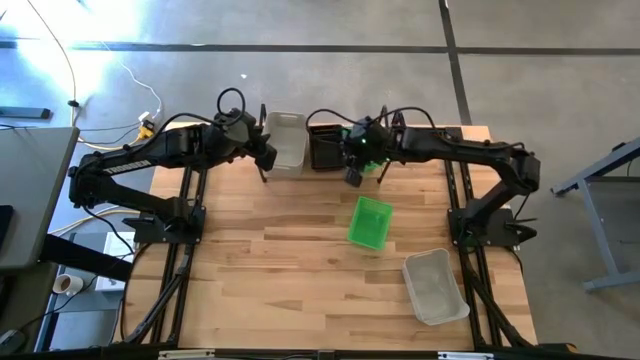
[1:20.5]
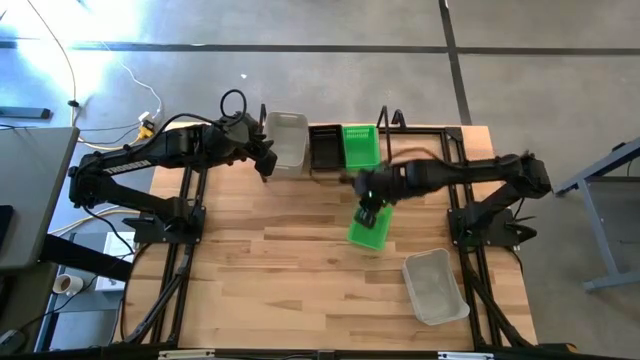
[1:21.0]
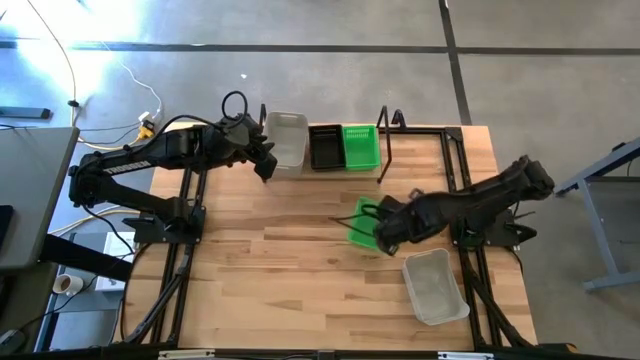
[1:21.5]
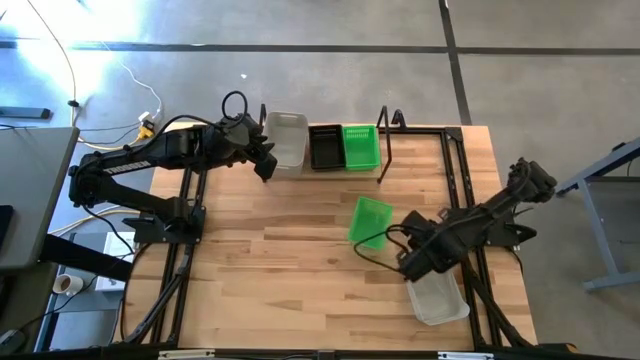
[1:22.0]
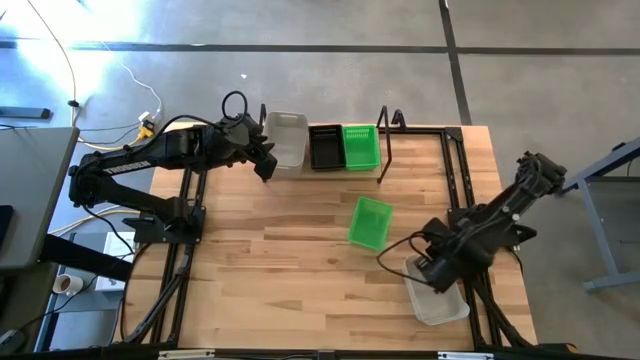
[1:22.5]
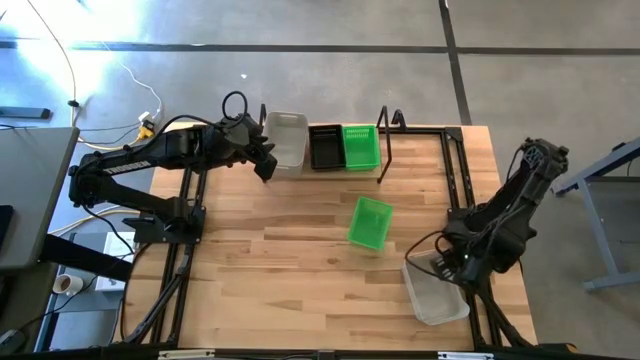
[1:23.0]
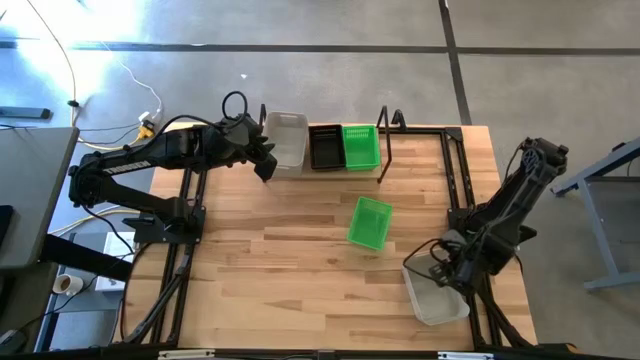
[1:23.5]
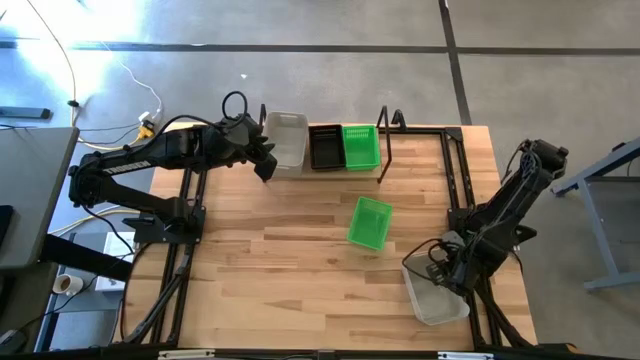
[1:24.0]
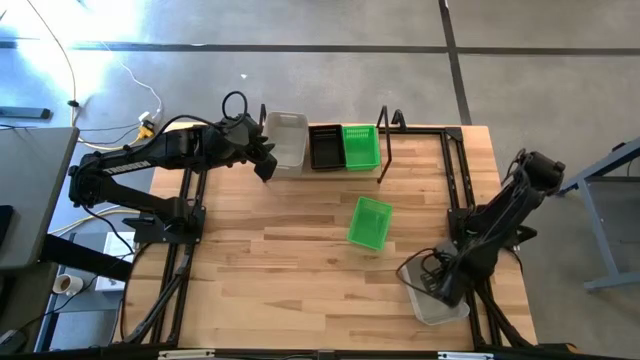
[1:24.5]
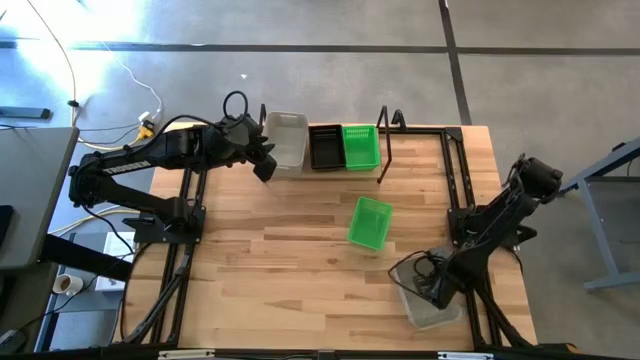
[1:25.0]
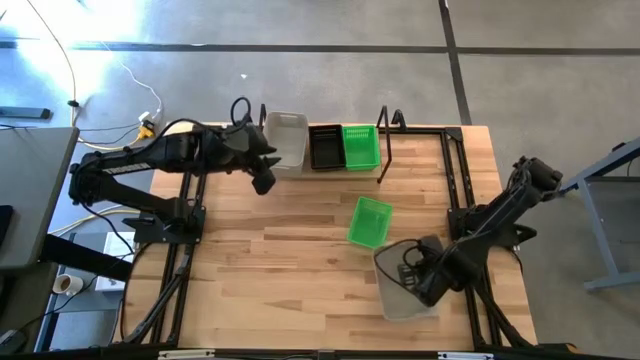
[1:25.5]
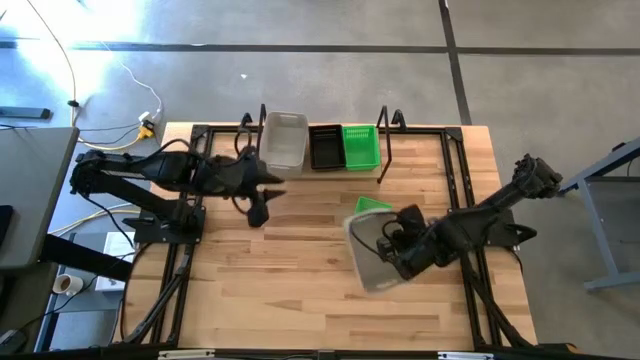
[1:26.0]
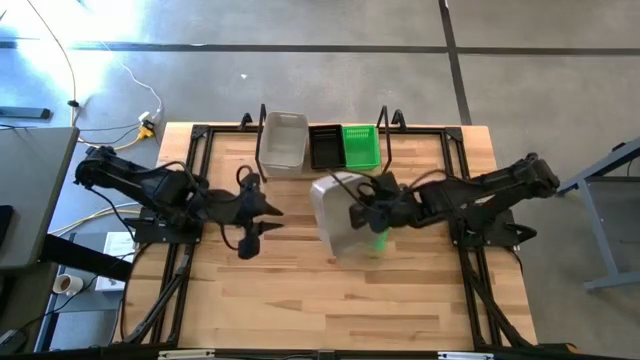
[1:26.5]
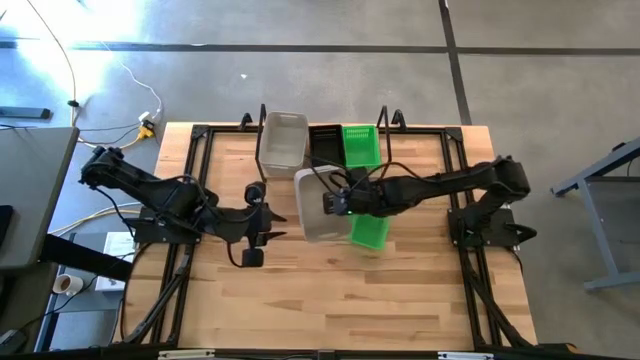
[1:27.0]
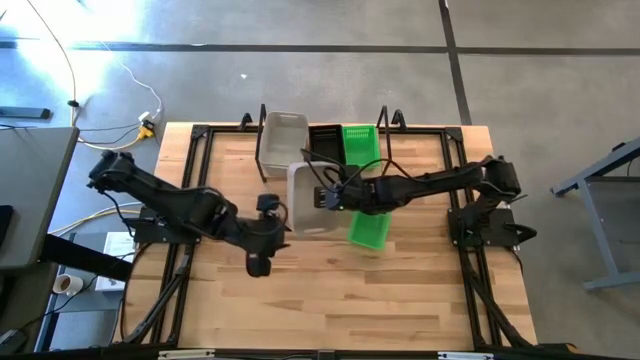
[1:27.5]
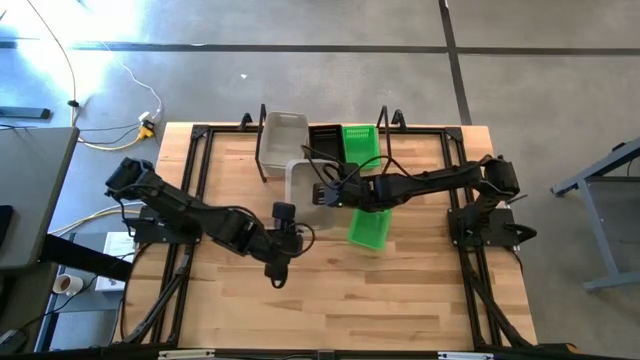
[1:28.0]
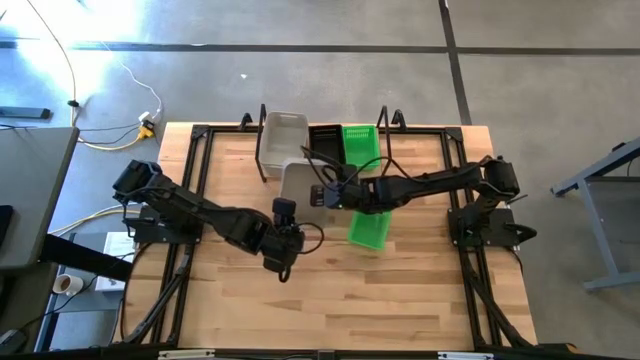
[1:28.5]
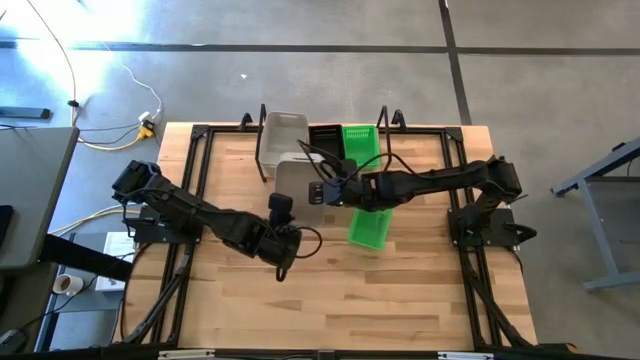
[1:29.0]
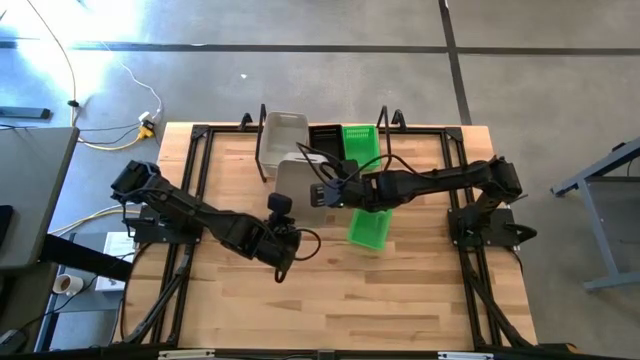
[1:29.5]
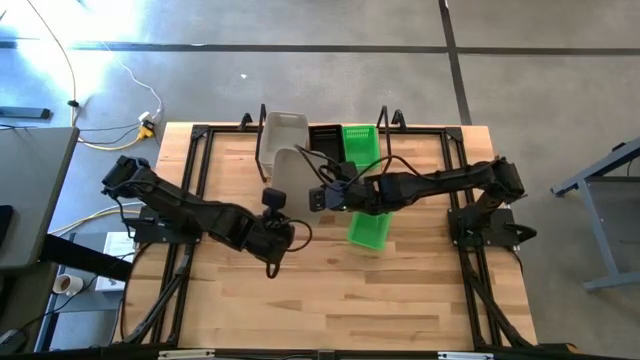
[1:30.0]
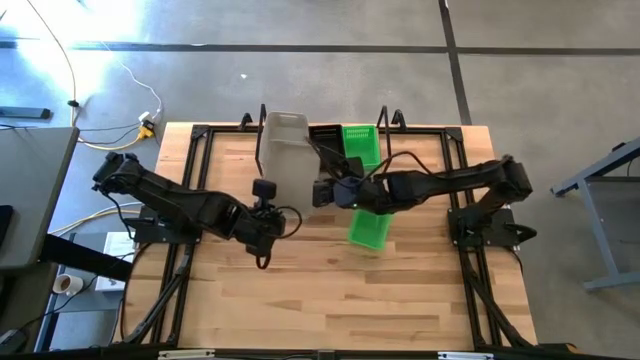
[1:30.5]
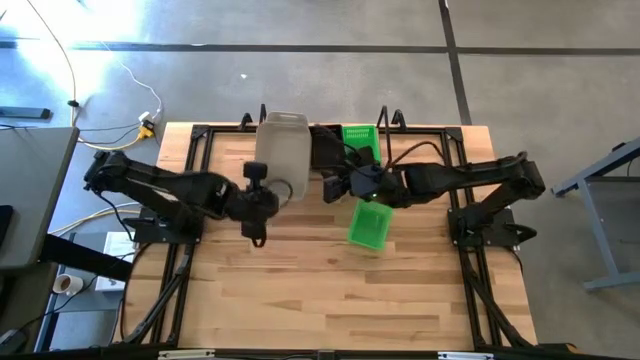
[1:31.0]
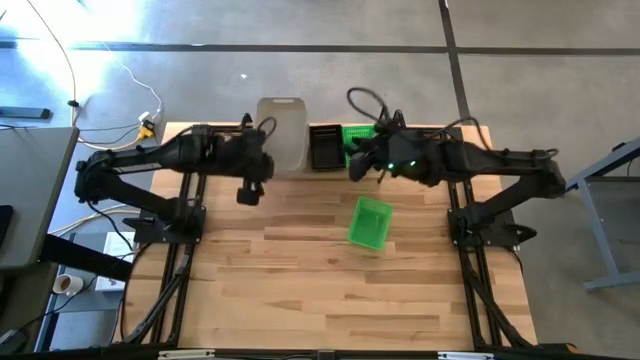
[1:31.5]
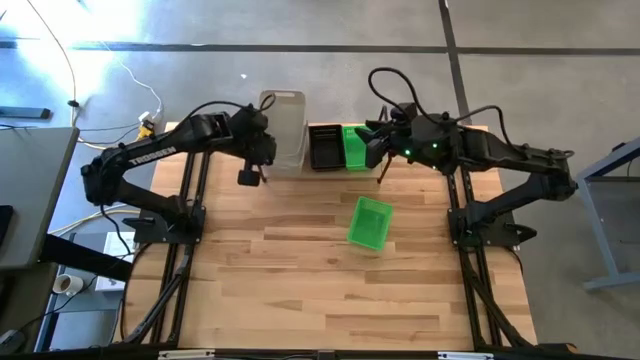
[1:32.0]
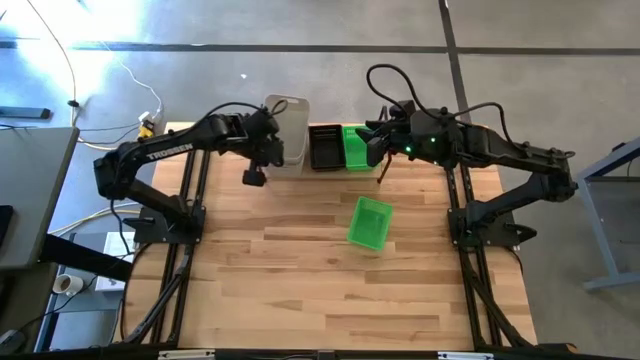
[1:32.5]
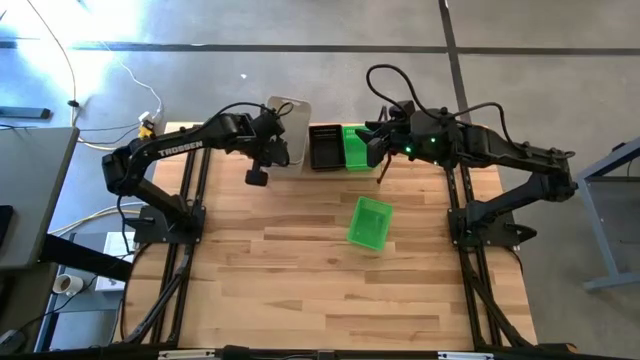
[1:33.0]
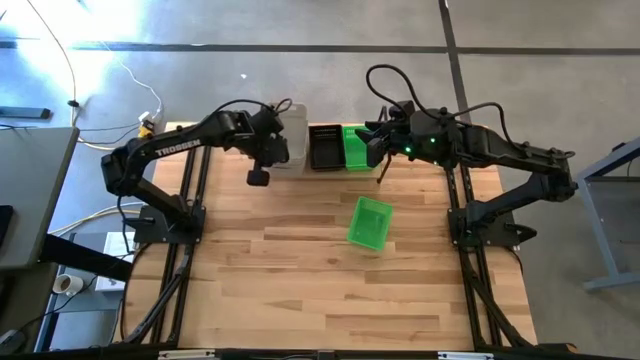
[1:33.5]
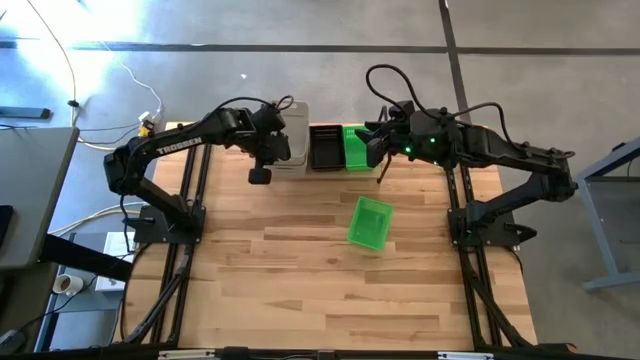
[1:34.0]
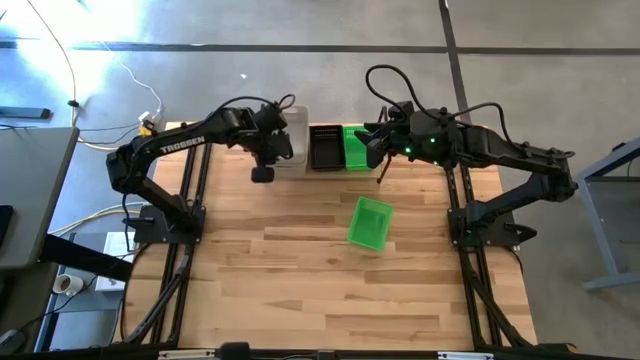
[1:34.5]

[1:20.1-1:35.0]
Task: Stack baskets on shelf by color
Stack the gray bin on the gray bins on the shelf

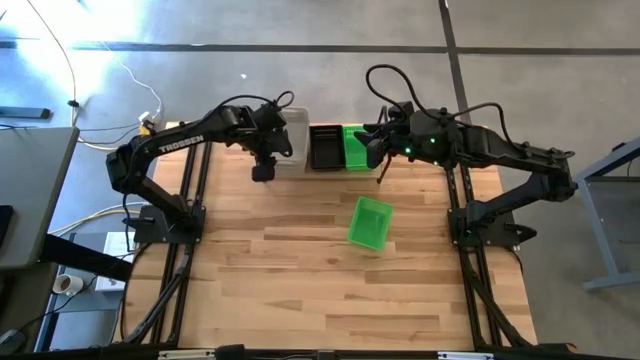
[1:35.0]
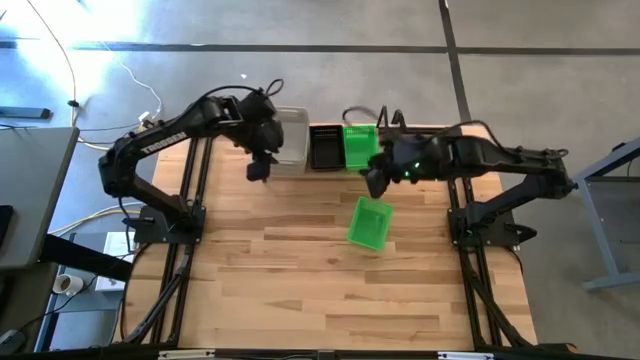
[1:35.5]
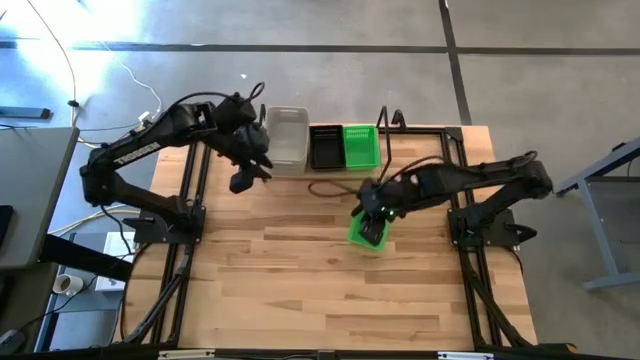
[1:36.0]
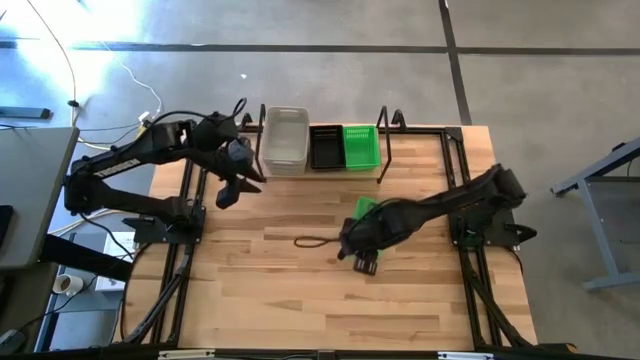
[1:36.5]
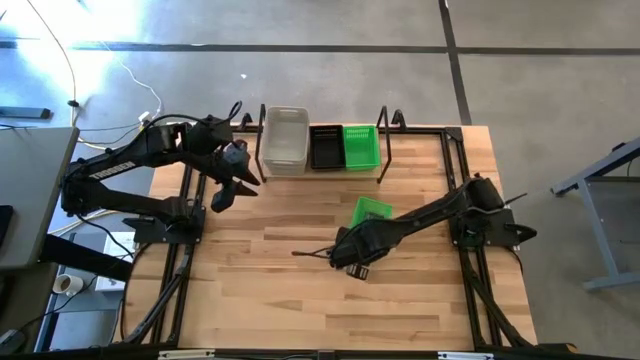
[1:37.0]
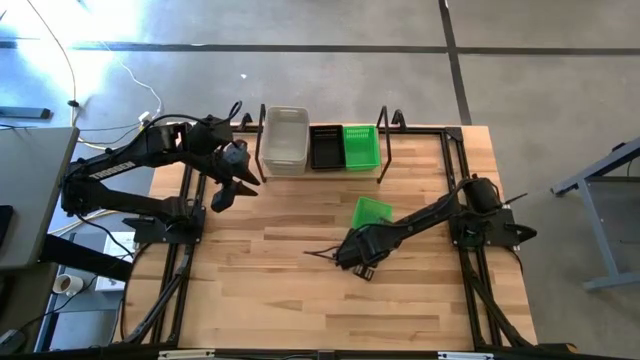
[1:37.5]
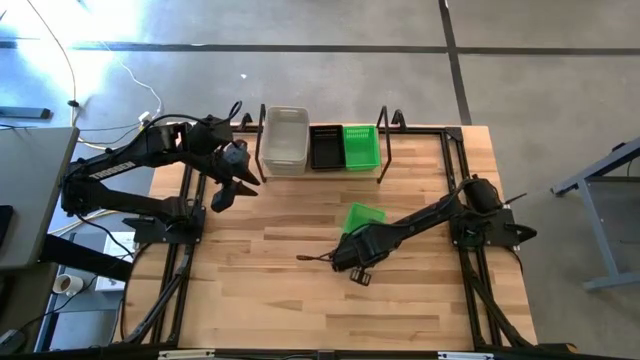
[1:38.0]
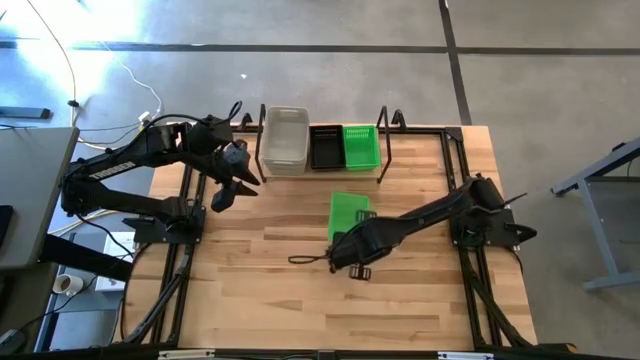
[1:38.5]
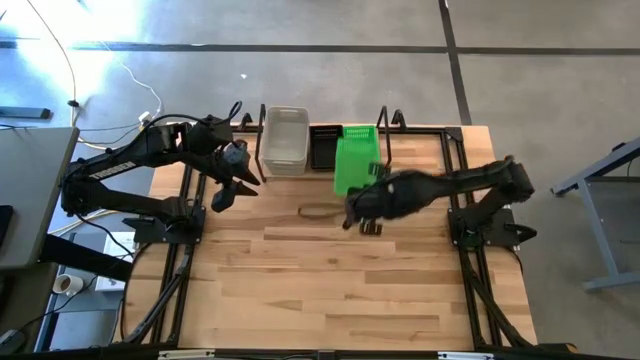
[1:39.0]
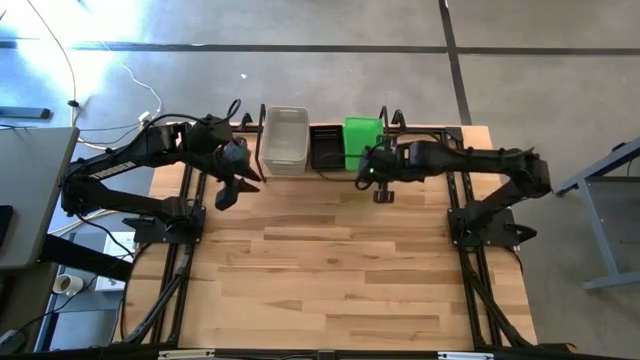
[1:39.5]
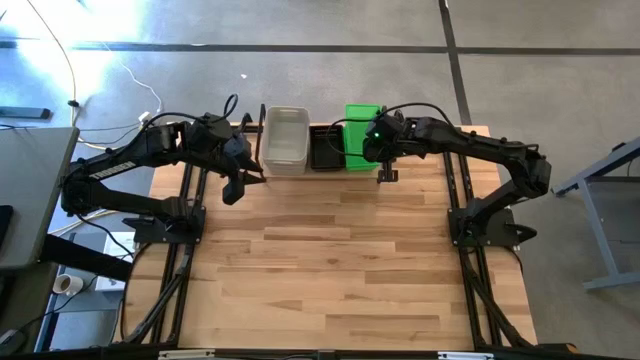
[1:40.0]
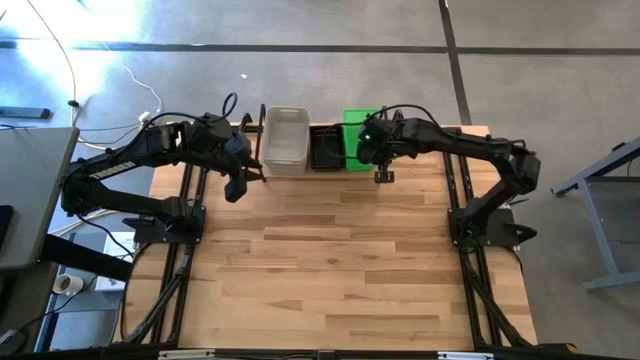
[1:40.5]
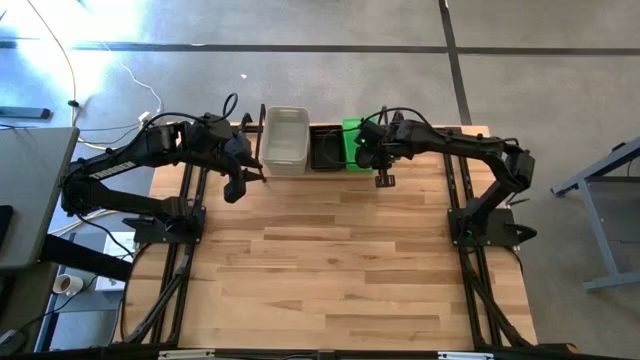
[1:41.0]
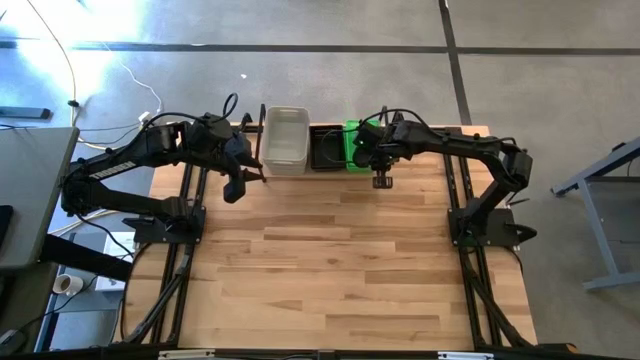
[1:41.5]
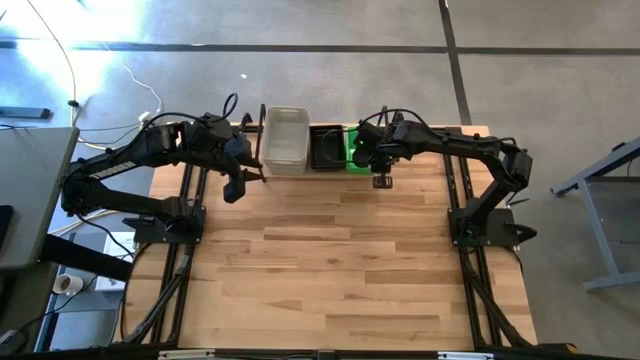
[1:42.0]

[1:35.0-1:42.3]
Stack the green bin on the green bins on the shelf
